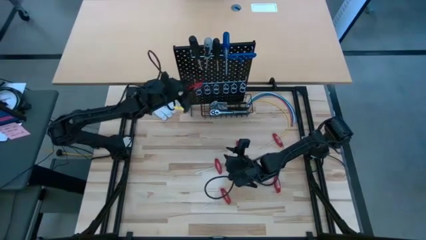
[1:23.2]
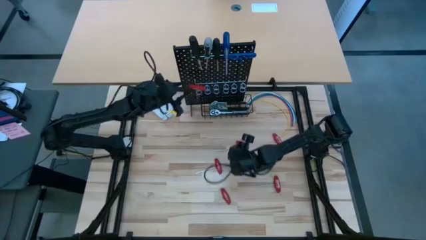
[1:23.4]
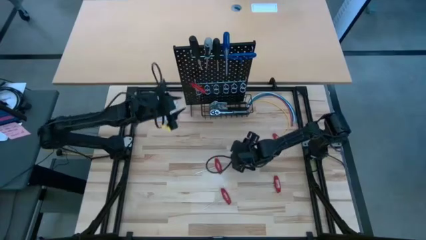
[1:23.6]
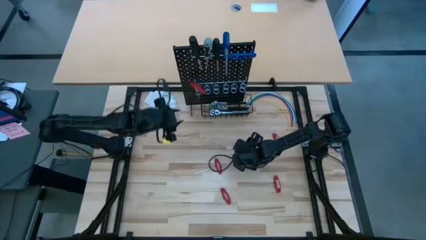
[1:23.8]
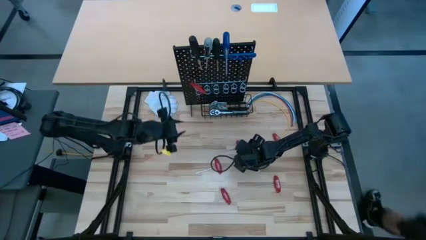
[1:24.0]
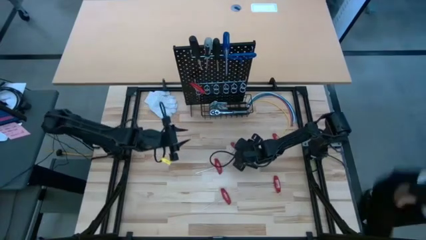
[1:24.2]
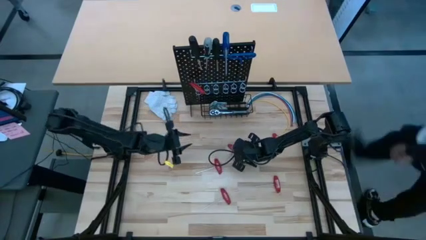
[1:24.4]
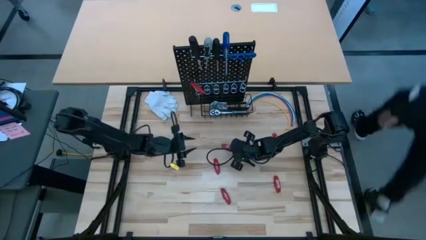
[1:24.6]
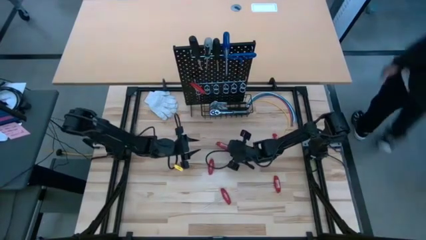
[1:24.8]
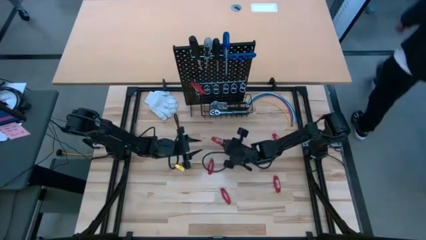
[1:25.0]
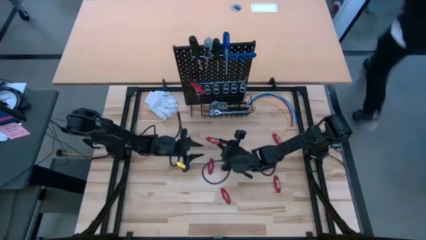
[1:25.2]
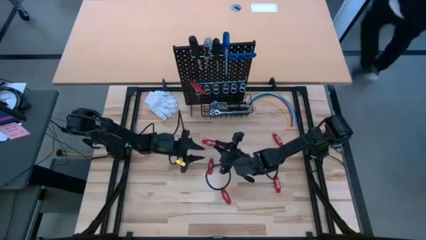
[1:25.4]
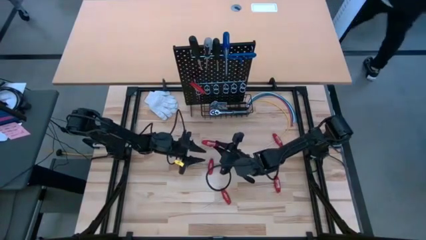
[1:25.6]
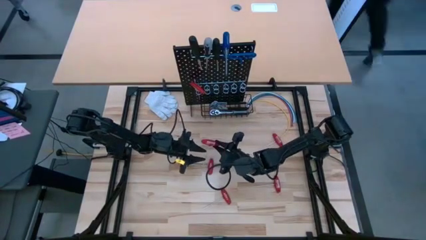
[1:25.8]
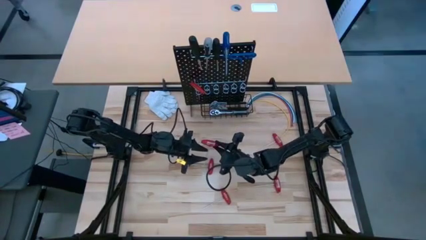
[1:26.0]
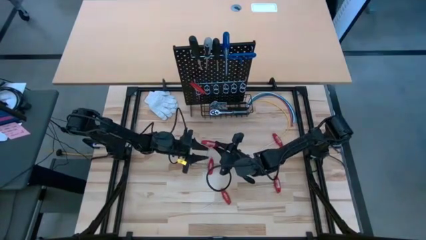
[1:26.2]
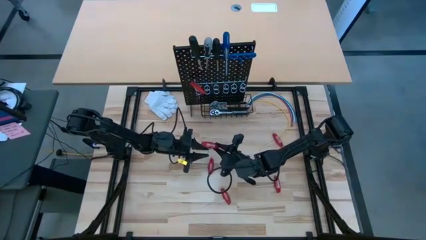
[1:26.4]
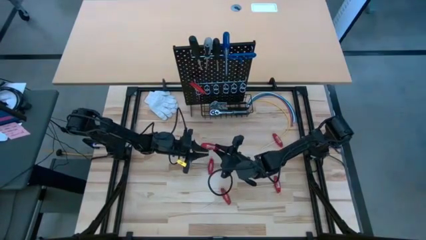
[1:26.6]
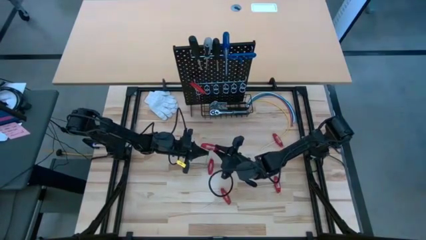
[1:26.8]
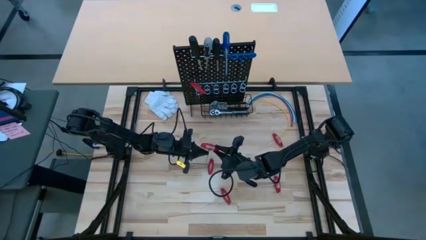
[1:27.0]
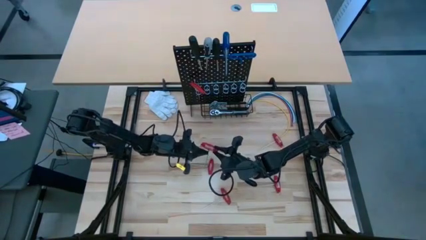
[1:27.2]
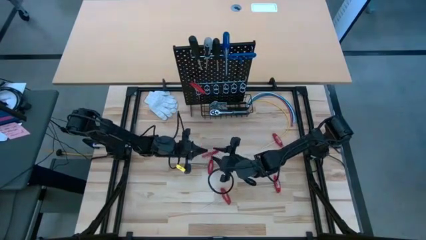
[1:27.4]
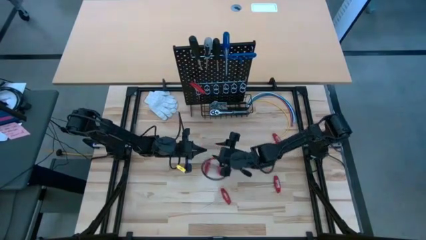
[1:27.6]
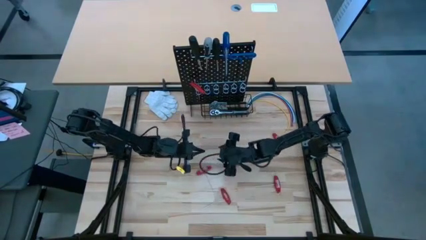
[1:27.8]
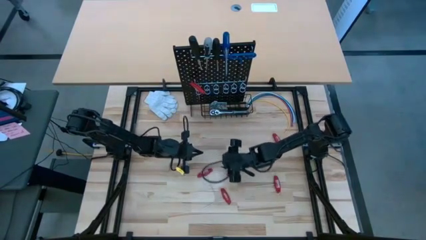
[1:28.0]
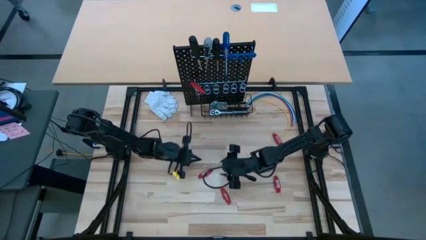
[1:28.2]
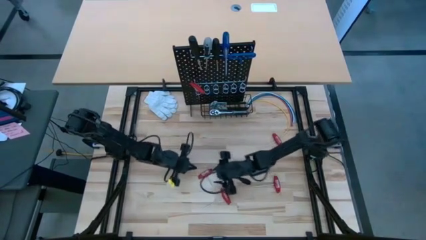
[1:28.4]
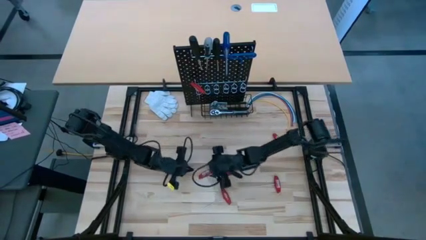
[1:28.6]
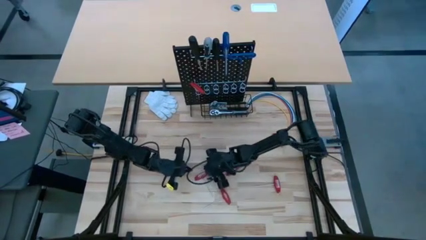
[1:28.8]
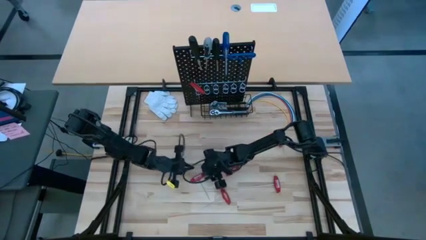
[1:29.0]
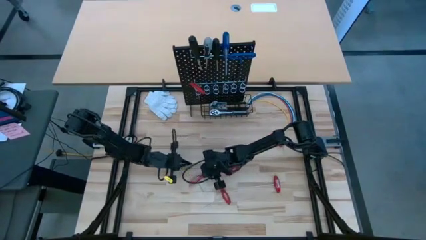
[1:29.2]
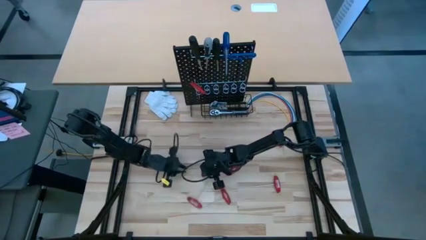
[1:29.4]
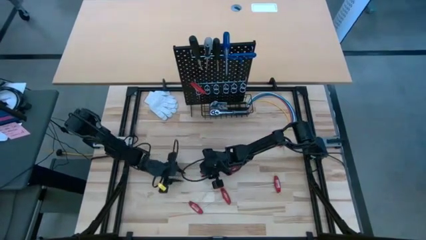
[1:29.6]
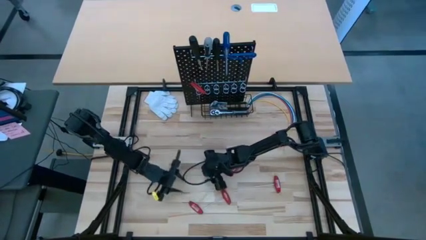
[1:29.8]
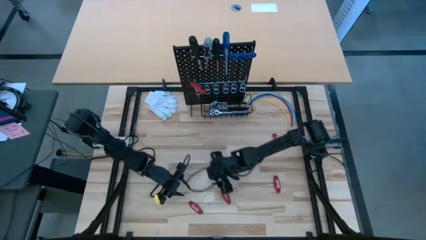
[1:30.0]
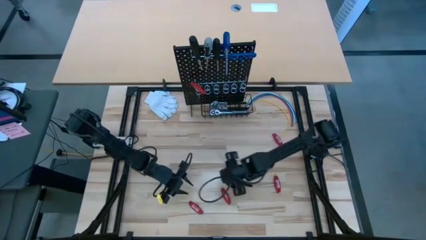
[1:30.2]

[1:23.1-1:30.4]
Task: Hang tools onto peg board
Hang the red allen wrench on the pegboard

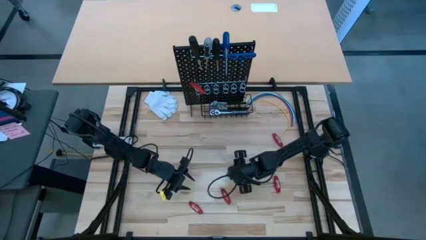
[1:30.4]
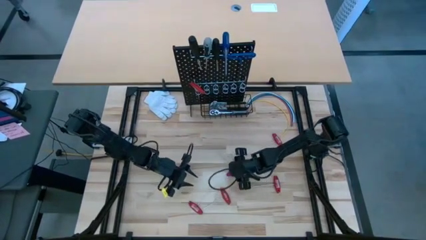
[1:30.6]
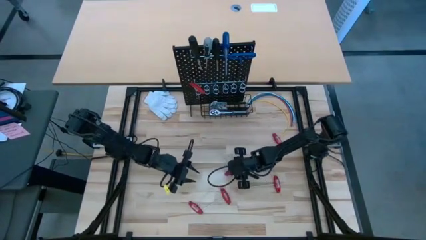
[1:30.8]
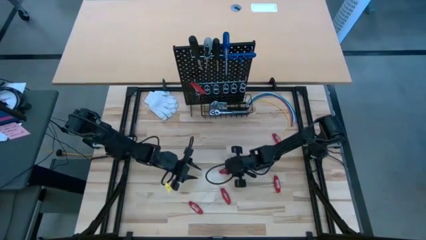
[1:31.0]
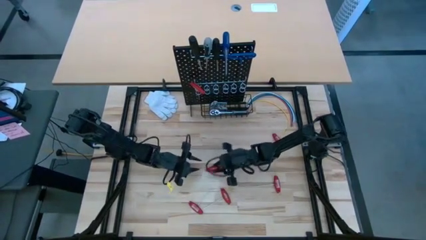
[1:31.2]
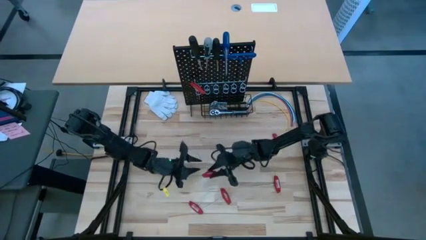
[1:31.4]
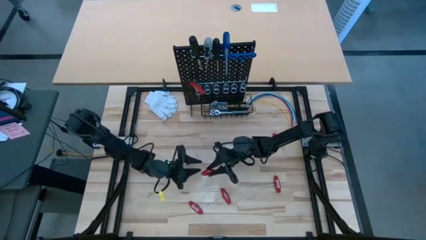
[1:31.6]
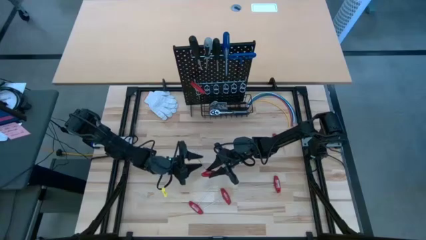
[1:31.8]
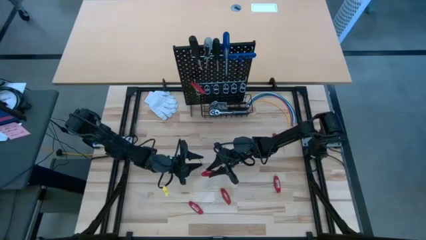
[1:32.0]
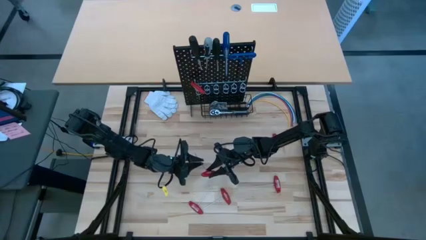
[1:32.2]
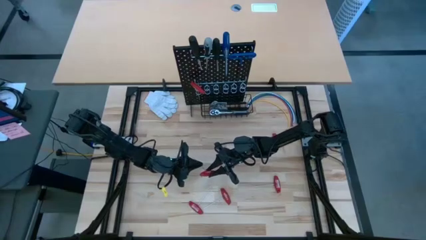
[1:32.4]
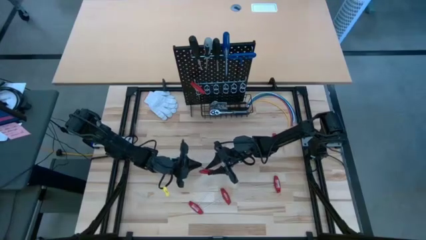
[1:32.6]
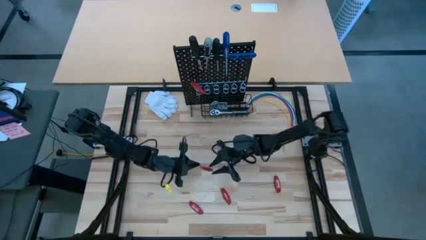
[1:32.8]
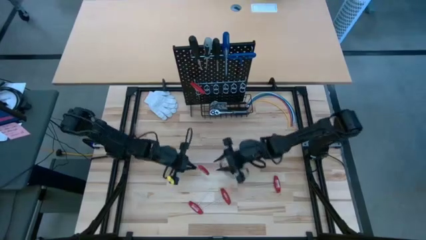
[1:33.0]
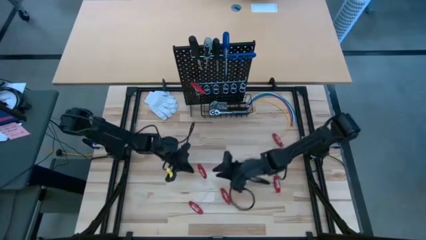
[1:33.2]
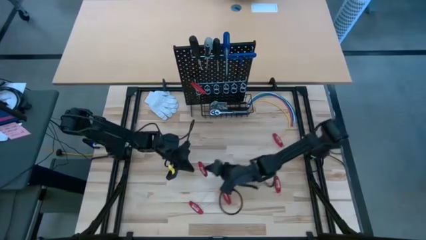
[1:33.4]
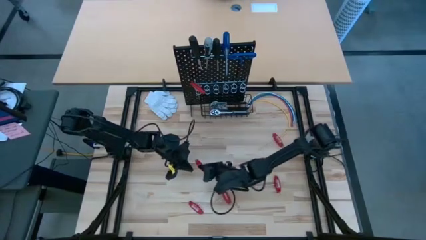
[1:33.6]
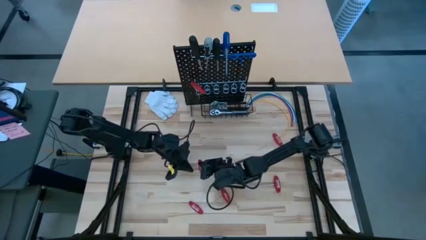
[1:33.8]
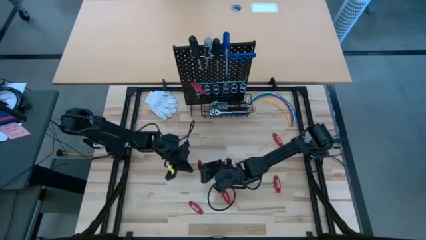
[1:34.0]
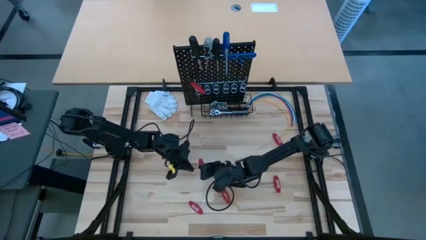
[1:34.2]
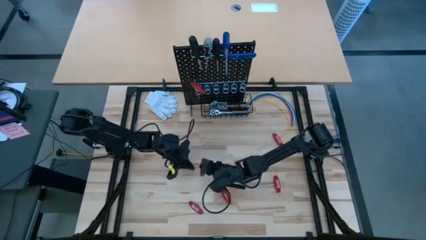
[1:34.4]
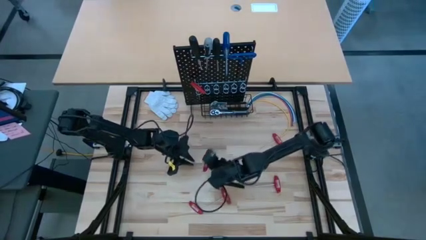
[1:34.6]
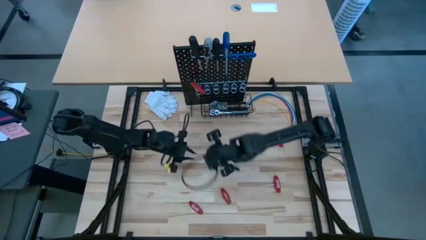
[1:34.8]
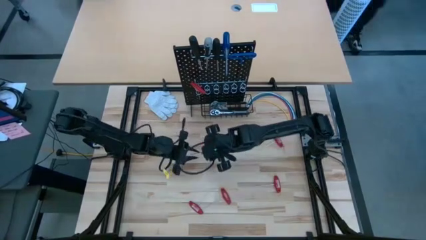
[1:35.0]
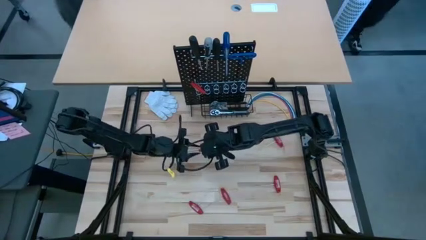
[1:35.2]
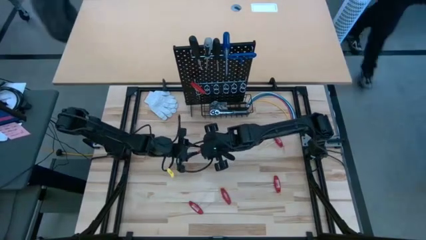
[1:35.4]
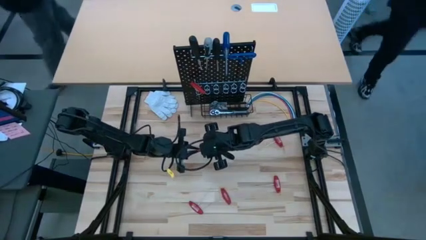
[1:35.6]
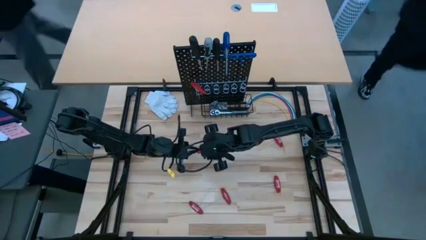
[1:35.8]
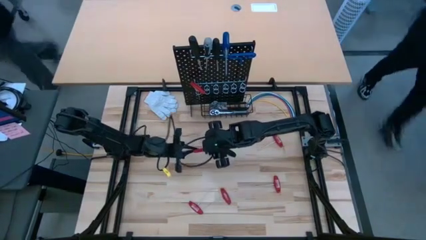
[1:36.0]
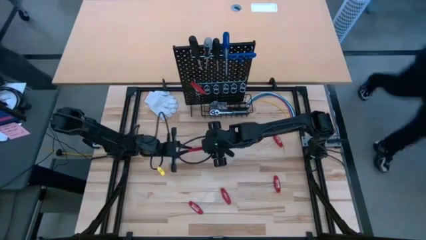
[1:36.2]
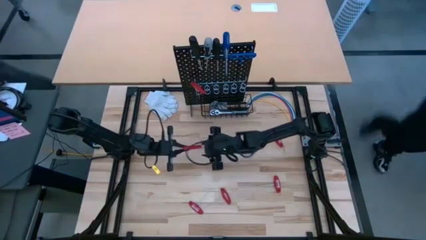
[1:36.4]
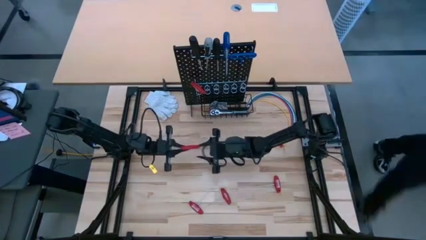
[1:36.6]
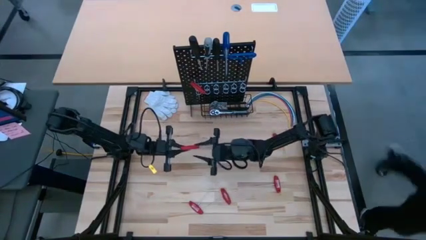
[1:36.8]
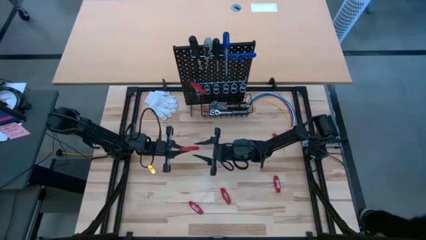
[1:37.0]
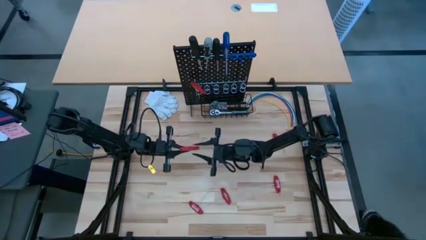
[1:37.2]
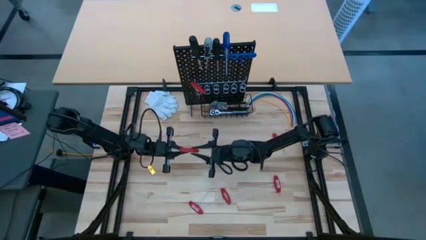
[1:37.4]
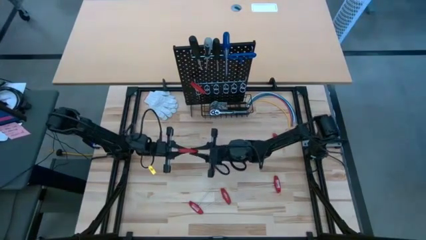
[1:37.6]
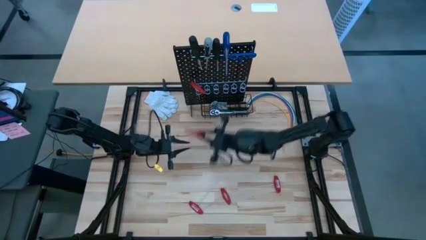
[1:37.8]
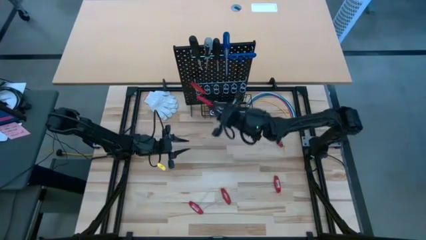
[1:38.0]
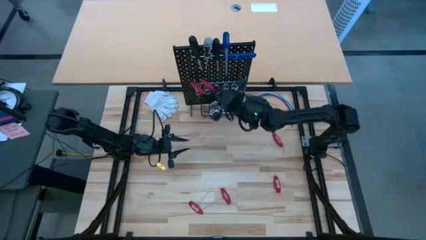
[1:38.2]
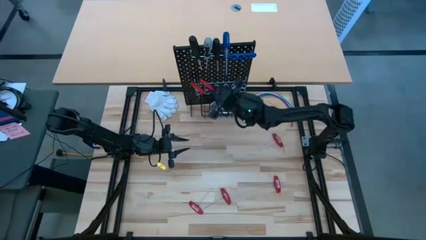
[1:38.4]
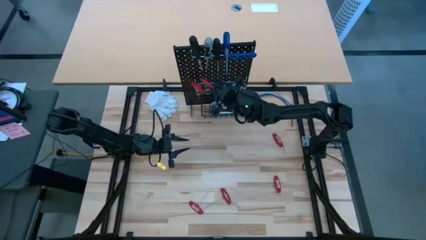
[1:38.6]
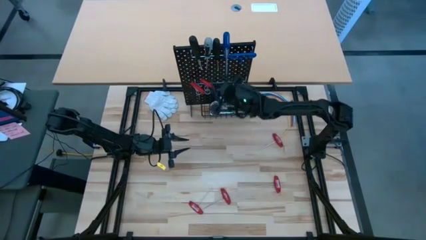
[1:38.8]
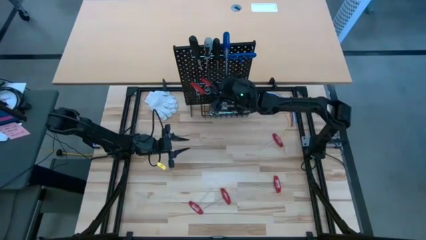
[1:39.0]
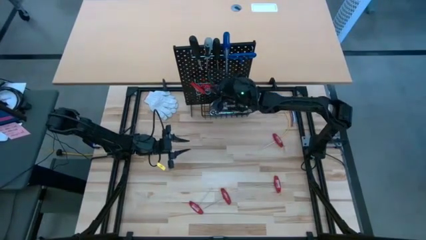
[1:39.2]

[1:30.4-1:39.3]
Hang the red allen wrench on the pegboard
